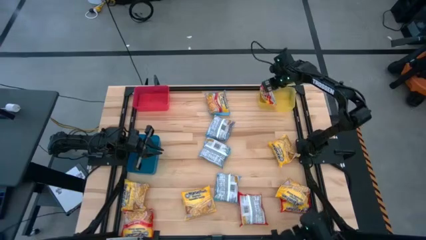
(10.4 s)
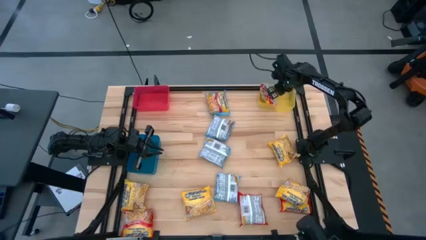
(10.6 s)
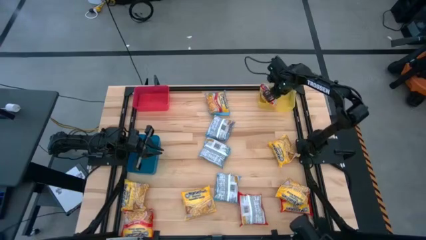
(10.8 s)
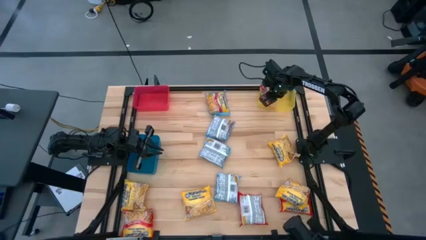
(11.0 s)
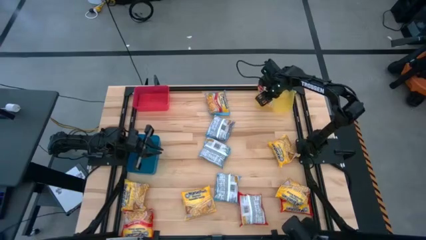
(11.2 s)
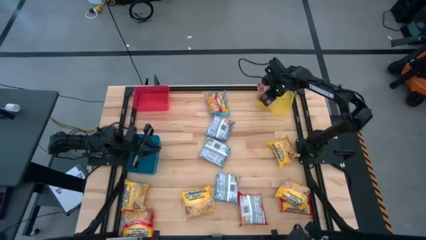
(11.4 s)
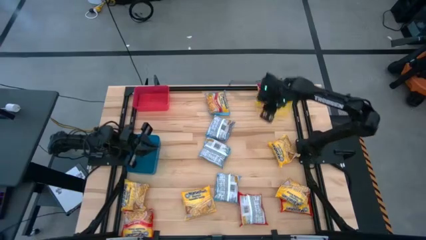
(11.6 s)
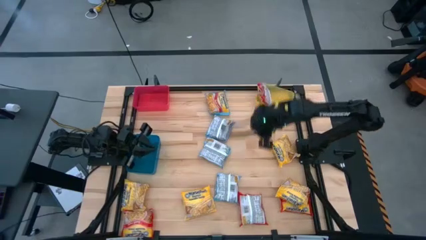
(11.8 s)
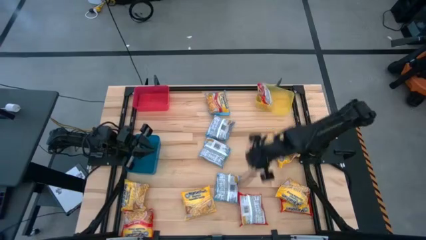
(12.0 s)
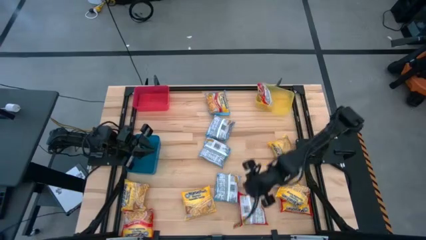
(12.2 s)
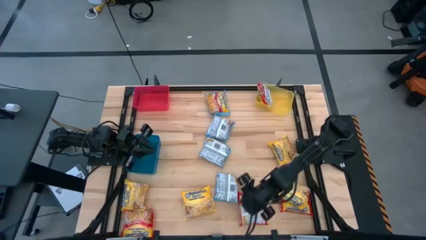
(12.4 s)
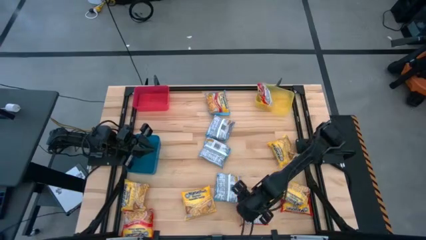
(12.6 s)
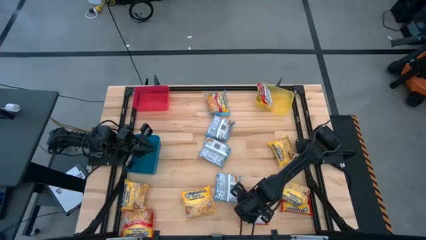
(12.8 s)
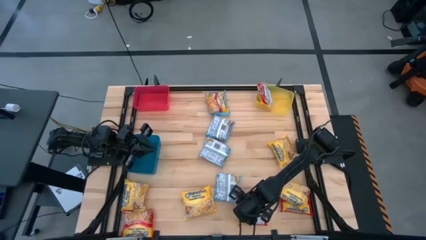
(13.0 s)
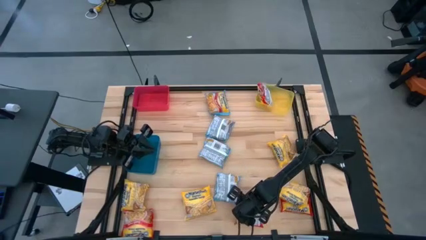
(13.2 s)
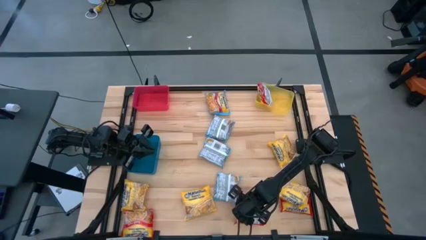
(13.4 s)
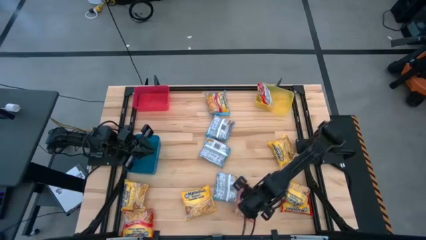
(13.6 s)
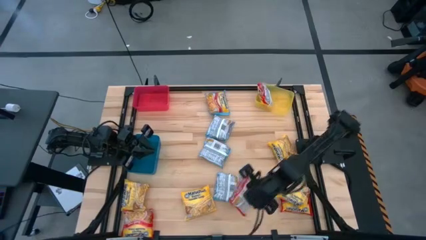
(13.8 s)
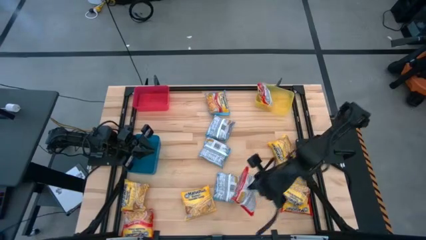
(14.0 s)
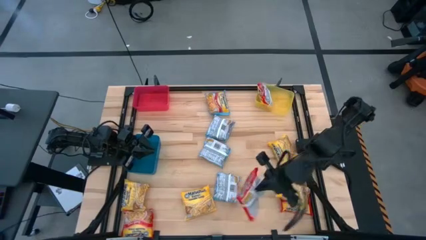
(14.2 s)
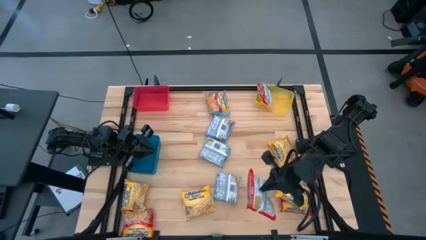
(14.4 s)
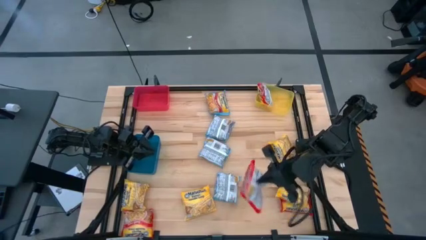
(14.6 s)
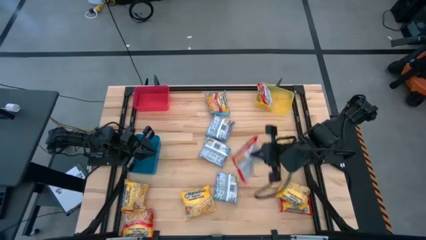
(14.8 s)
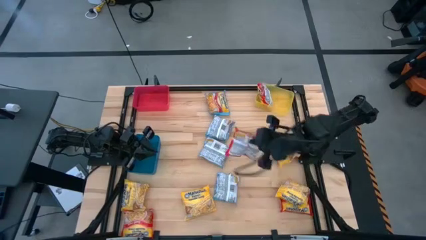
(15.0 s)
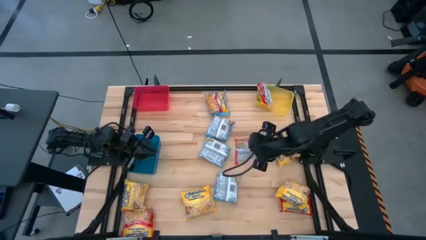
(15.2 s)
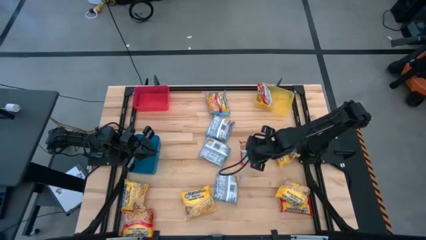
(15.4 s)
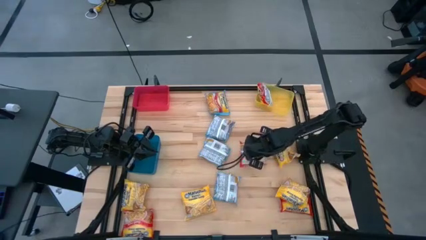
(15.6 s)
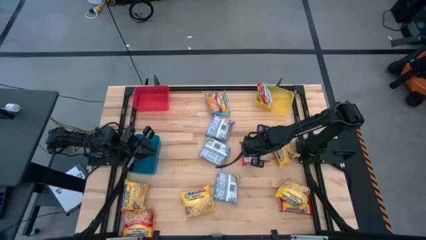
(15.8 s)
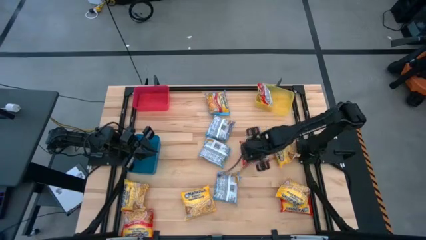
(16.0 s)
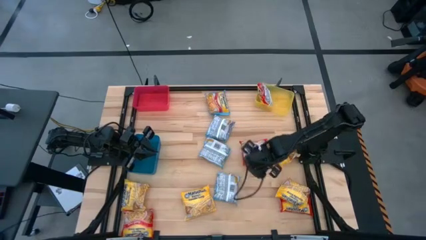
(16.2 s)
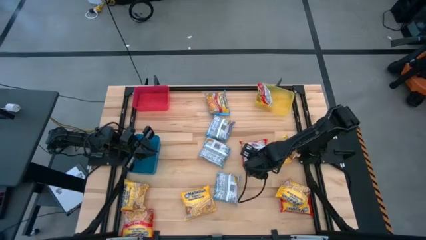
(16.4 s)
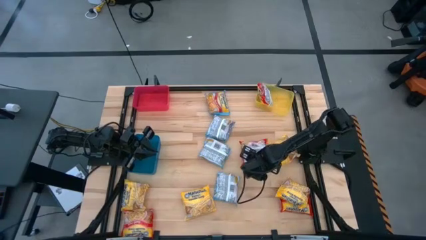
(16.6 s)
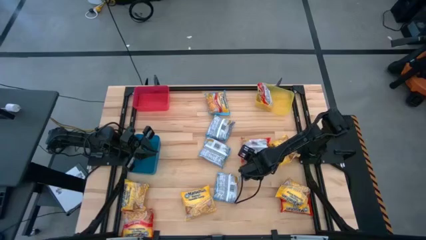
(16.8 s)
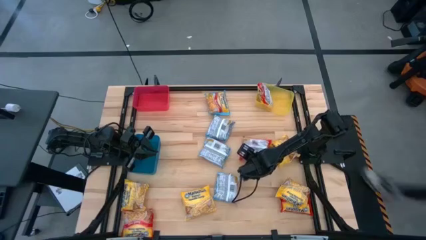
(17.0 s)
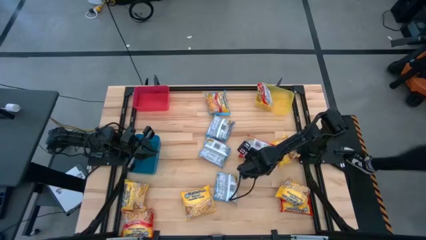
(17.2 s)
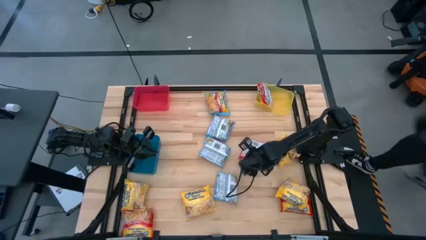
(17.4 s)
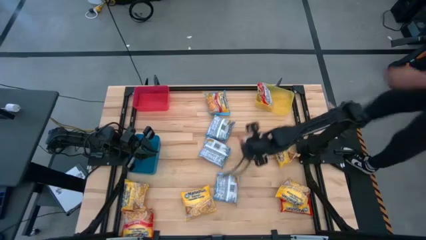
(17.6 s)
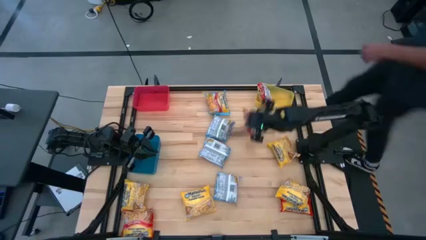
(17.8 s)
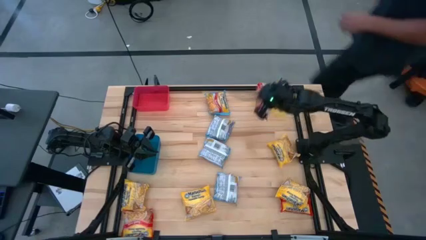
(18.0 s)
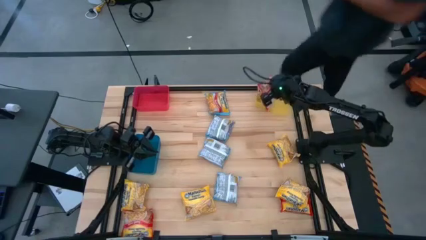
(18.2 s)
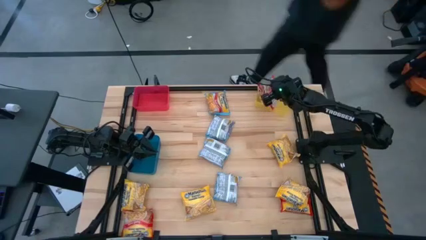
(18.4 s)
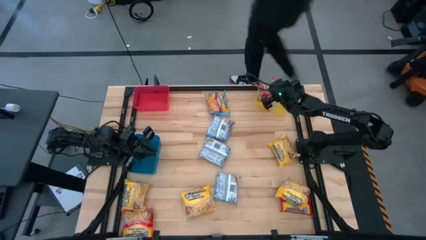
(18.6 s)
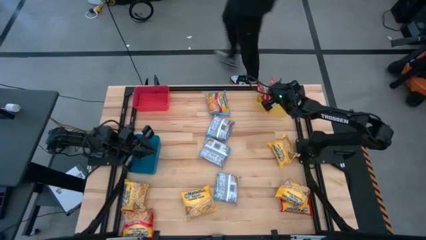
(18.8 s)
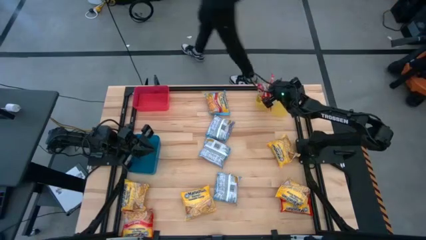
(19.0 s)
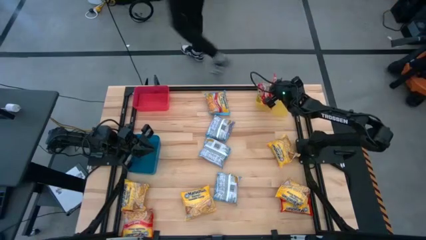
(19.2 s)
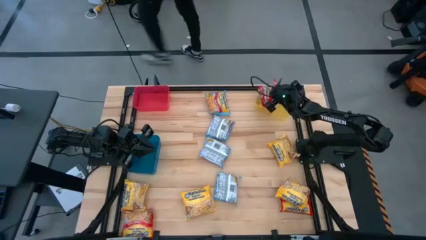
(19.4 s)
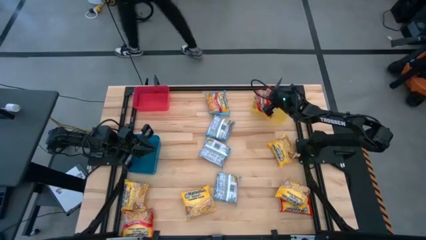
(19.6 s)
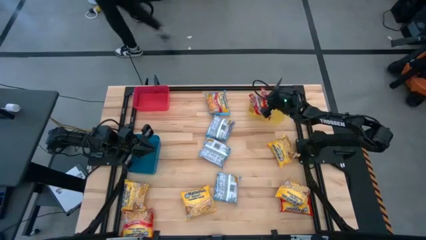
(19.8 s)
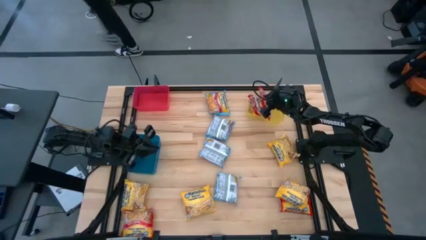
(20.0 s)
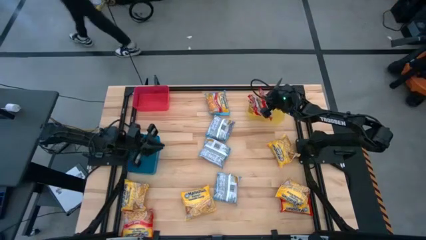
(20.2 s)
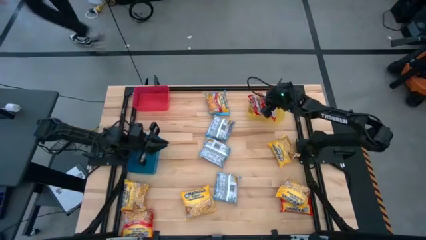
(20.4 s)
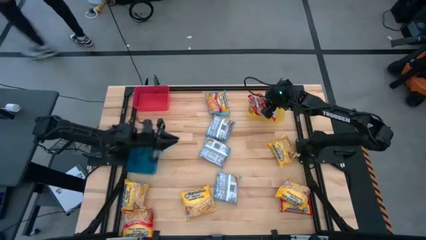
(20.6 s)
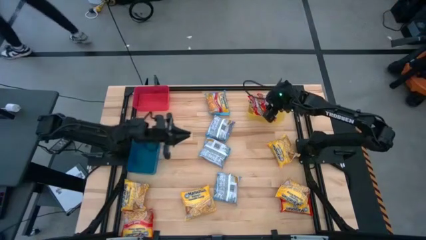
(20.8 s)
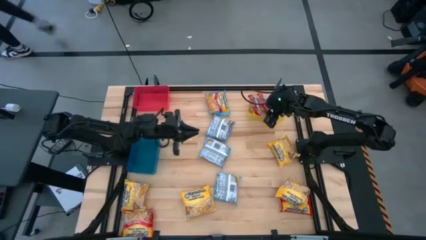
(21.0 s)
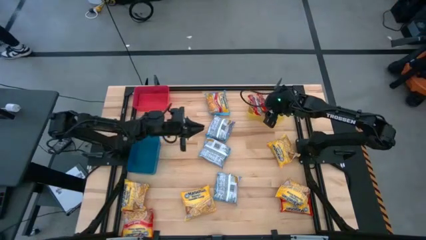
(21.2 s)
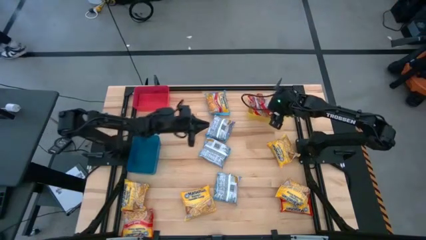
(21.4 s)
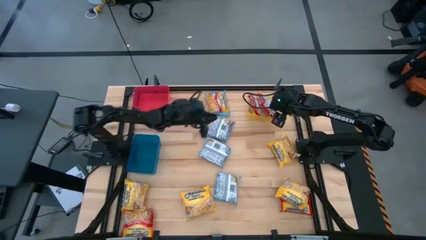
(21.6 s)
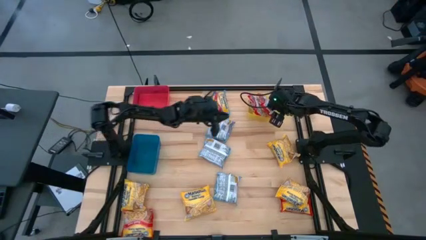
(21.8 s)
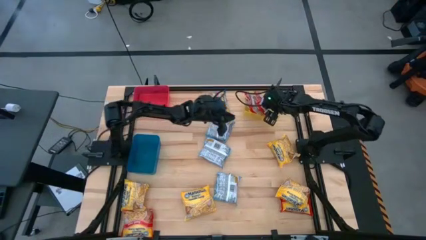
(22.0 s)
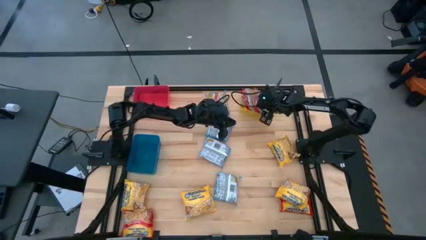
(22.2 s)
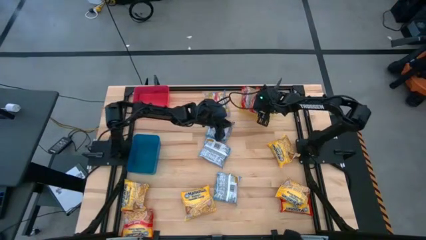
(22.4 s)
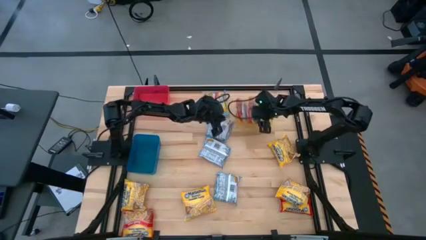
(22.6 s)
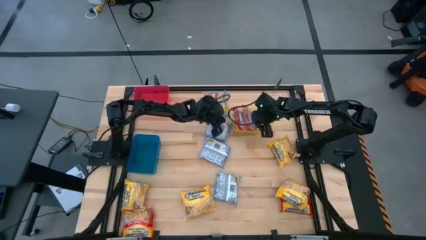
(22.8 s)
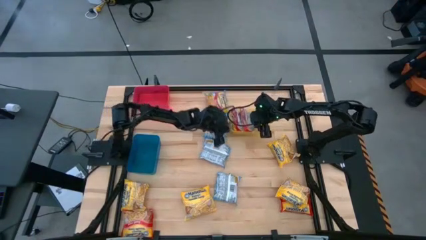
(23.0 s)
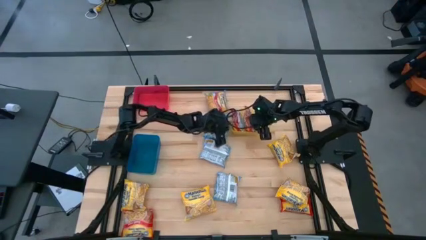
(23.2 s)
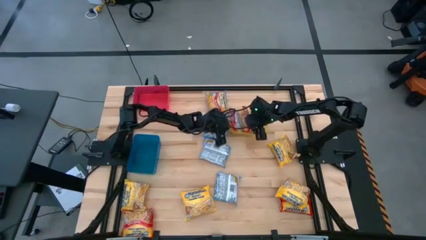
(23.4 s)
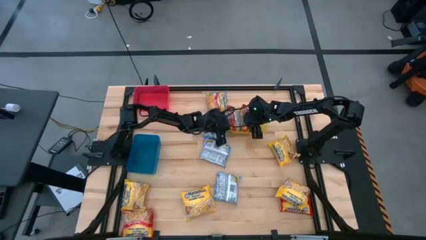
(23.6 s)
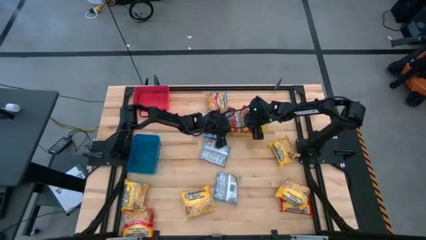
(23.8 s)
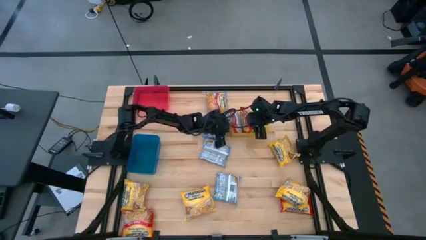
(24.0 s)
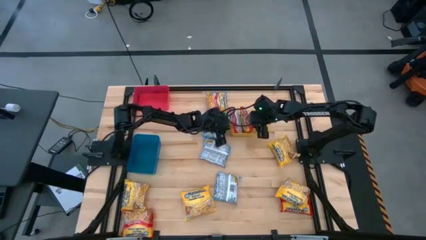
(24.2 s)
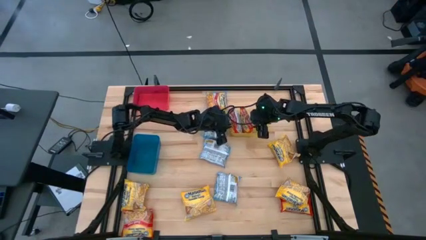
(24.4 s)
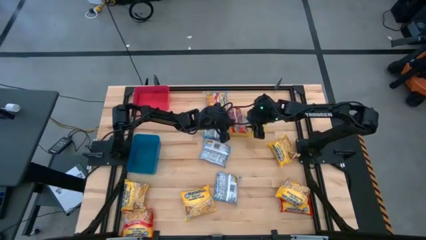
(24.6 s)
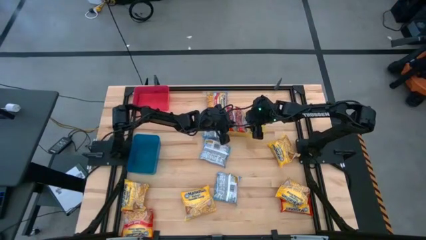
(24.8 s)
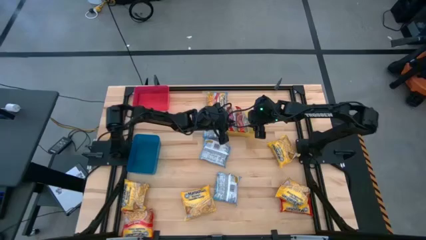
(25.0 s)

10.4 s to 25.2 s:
Task: Sort Maruchan noodles
Put the red noodle pack into the yellow bin
